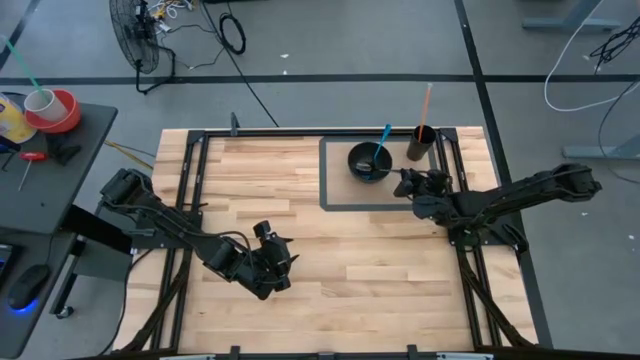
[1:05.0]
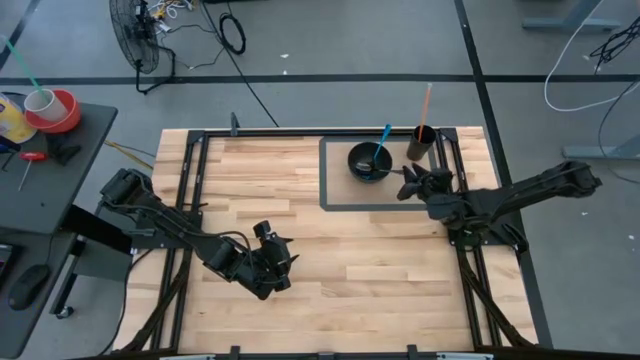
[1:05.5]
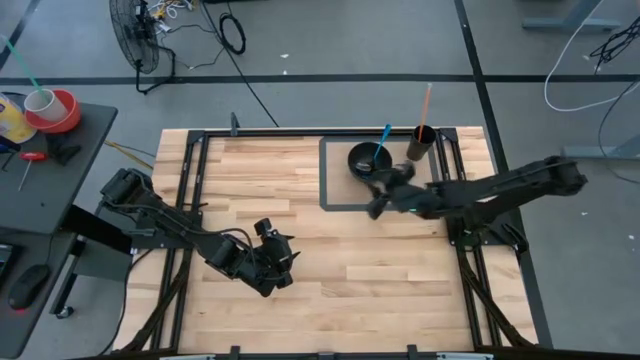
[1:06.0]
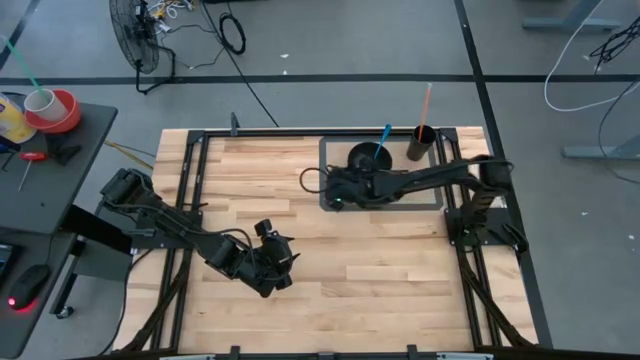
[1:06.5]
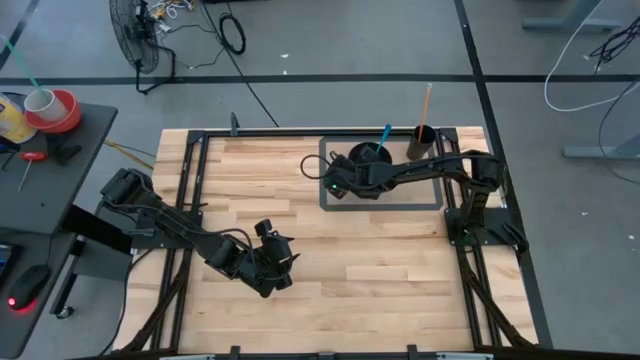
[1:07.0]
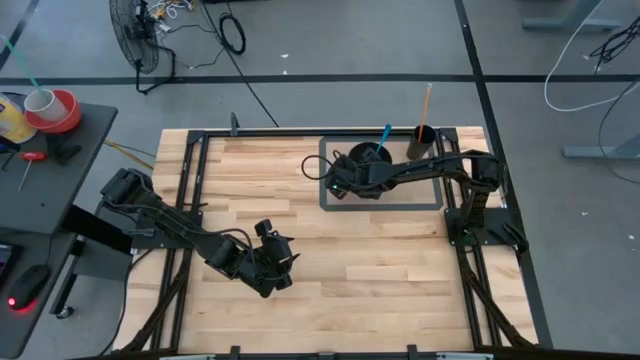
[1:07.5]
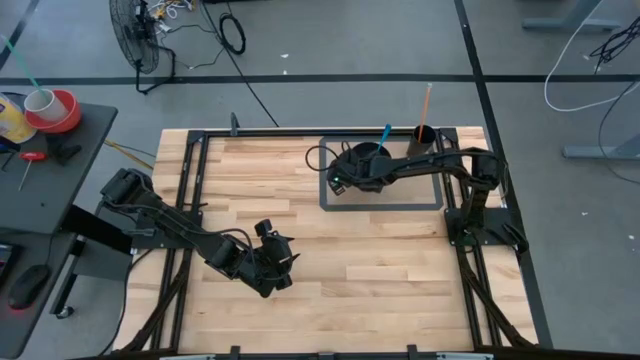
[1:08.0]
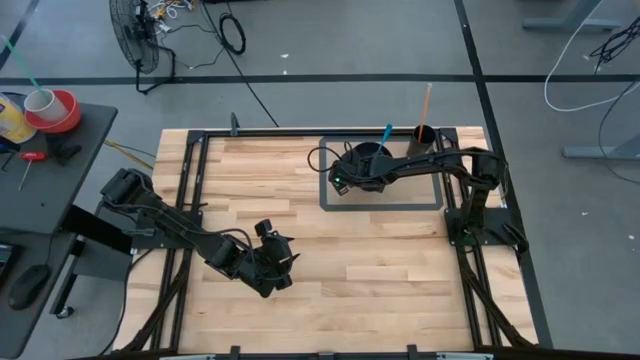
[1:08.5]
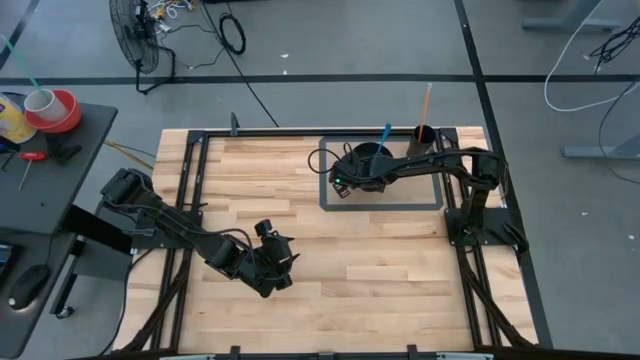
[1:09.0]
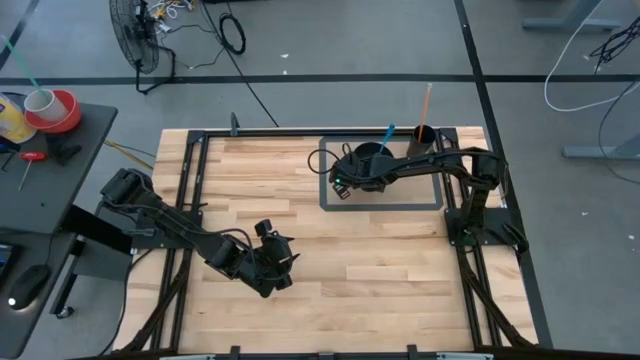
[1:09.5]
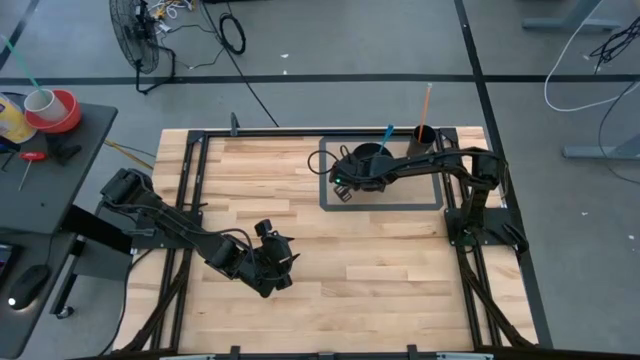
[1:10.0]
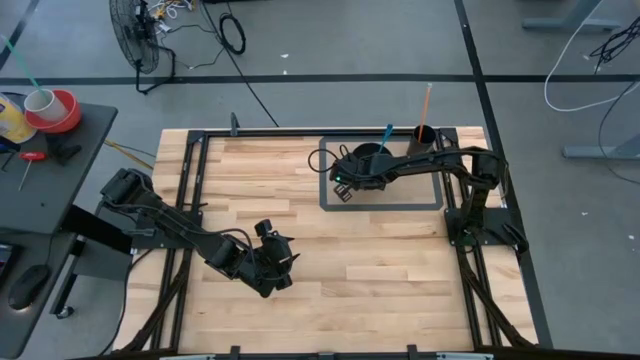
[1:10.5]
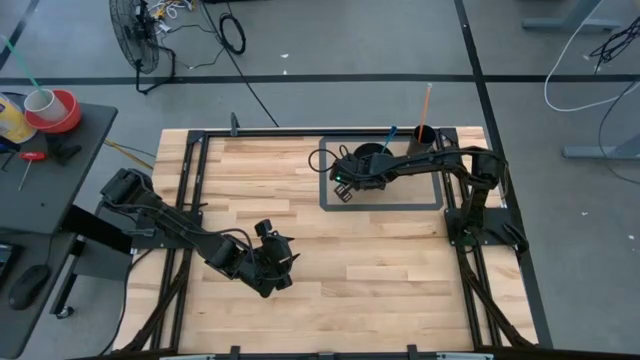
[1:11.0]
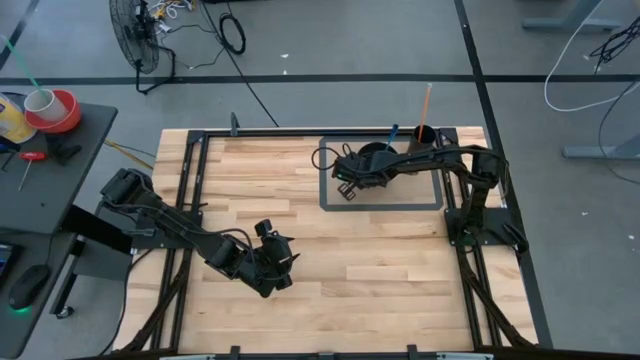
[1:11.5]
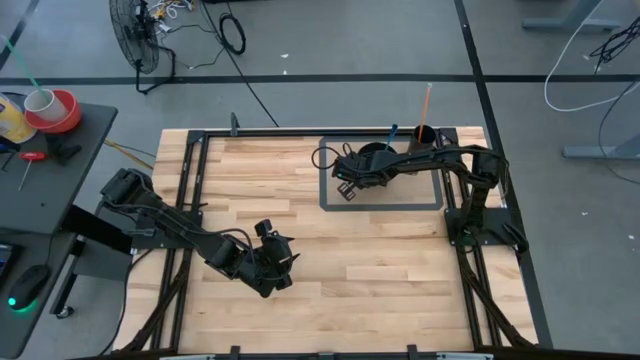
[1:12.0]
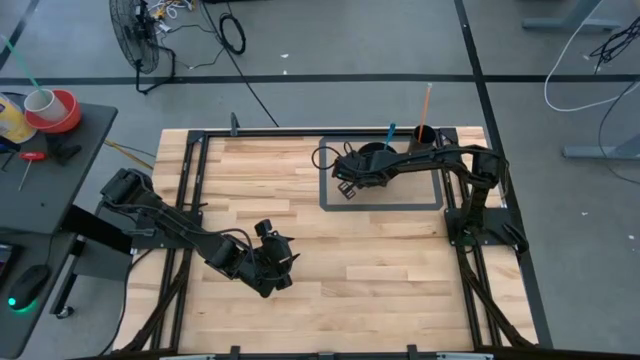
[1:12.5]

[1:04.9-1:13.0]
Task: Pick & Place Utensil
Adjust the black bowl

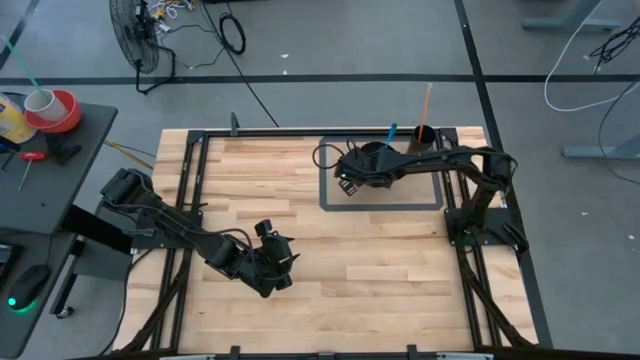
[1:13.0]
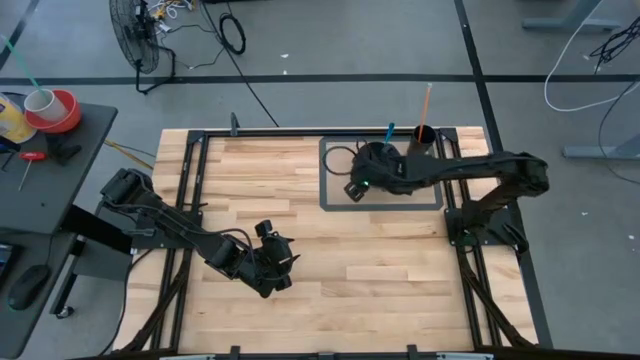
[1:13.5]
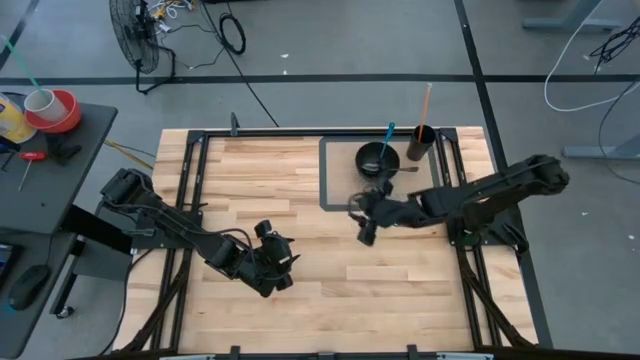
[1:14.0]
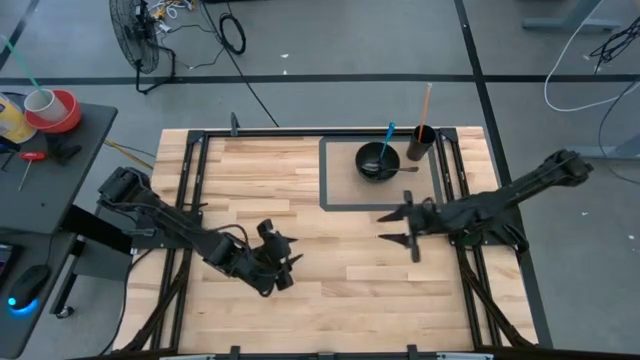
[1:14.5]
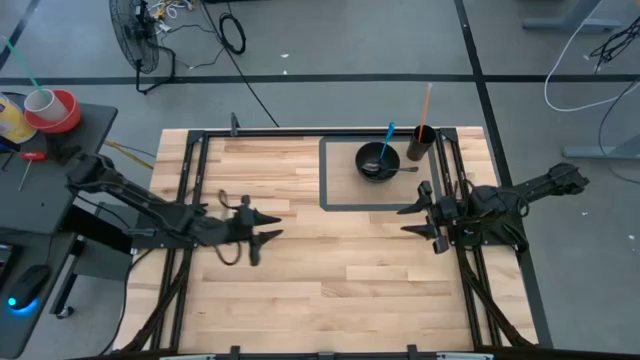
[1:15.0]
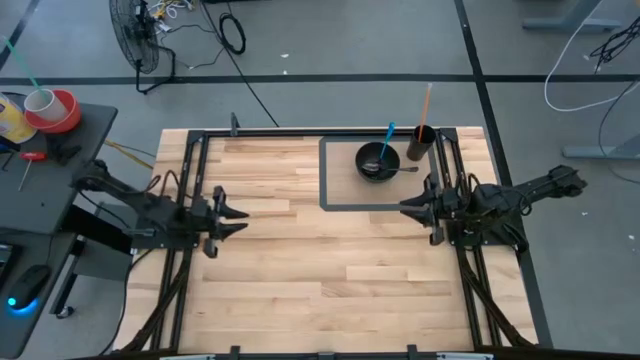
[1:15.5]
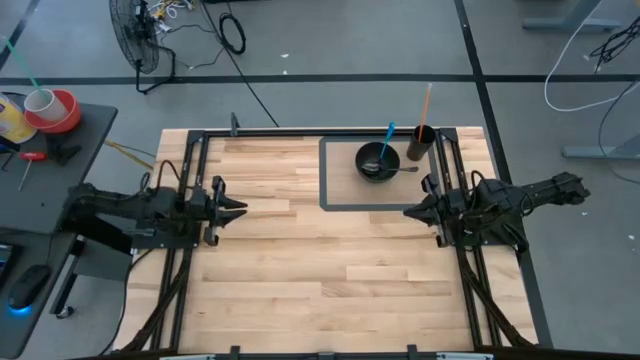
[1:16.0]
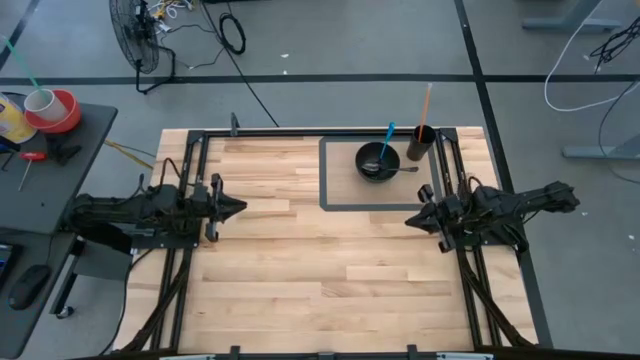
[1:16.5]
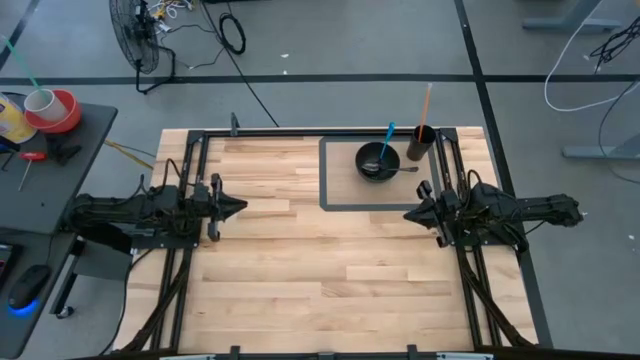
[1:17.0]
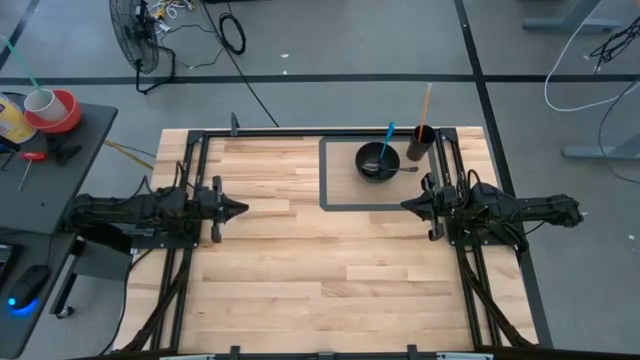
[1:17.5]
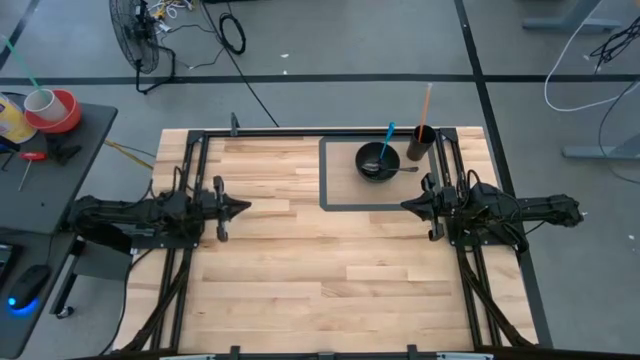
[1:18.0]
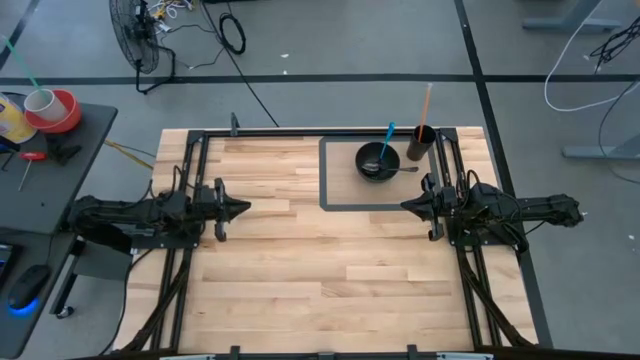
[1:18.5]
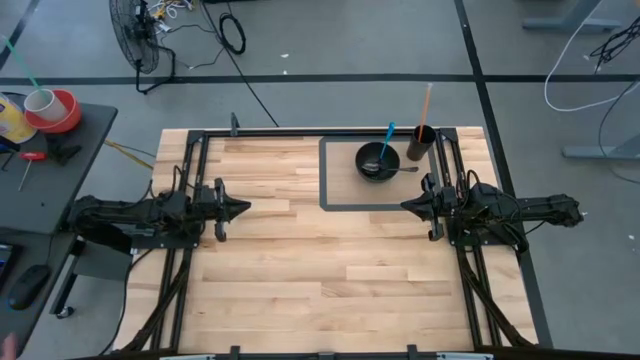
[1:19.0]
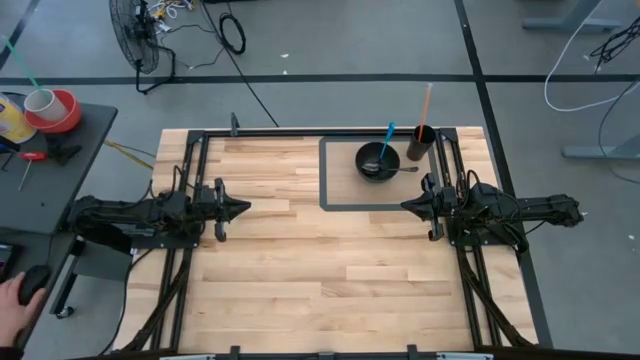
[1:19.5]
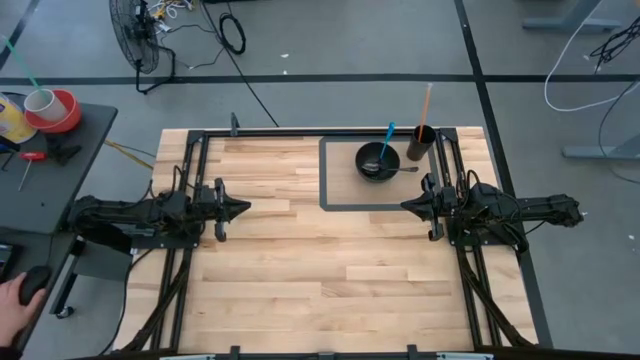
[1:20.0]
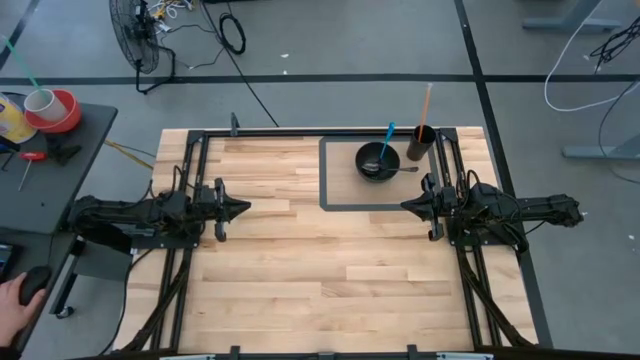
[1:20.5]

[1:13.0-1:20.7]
Return to Home Position

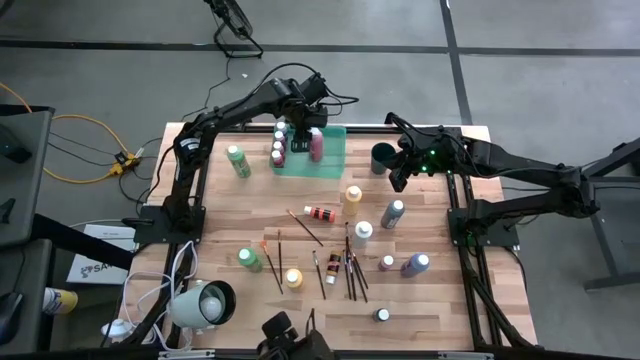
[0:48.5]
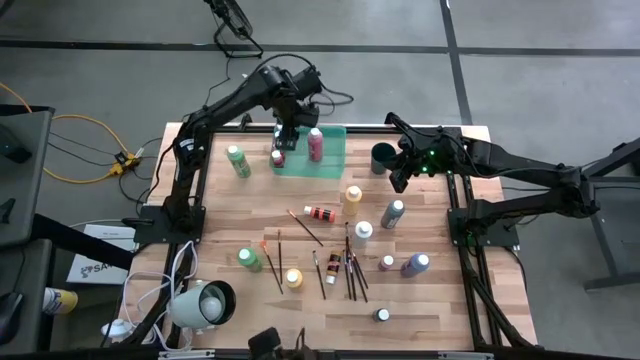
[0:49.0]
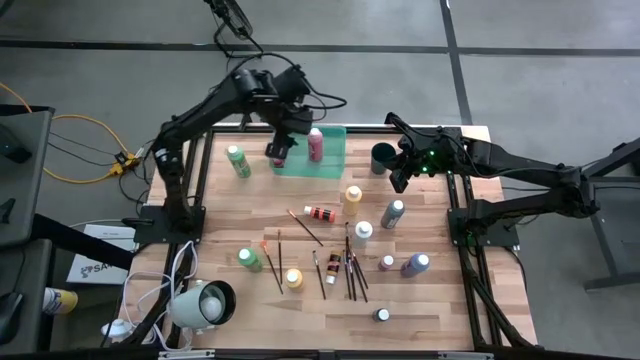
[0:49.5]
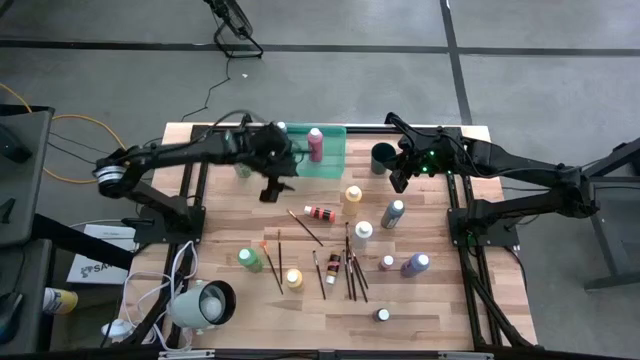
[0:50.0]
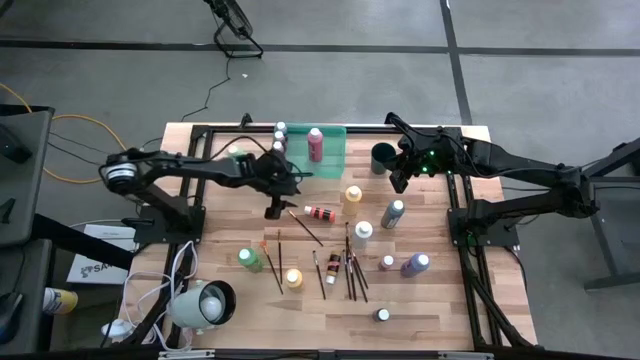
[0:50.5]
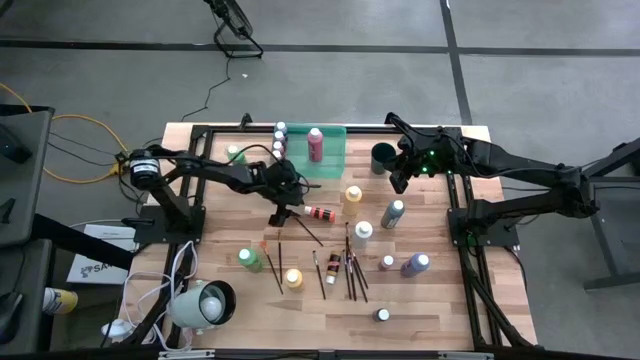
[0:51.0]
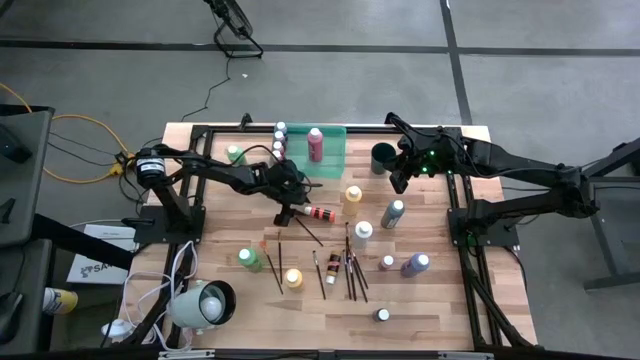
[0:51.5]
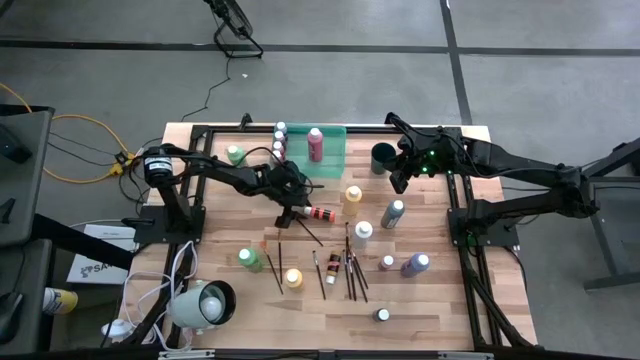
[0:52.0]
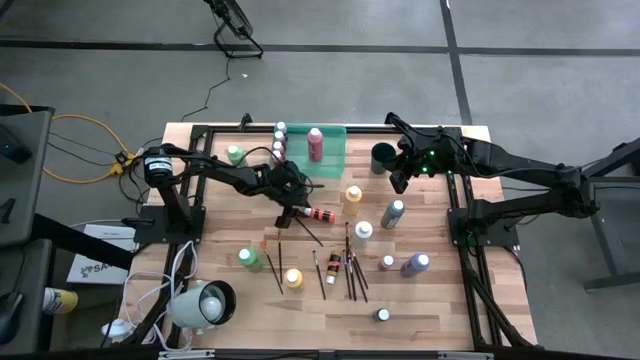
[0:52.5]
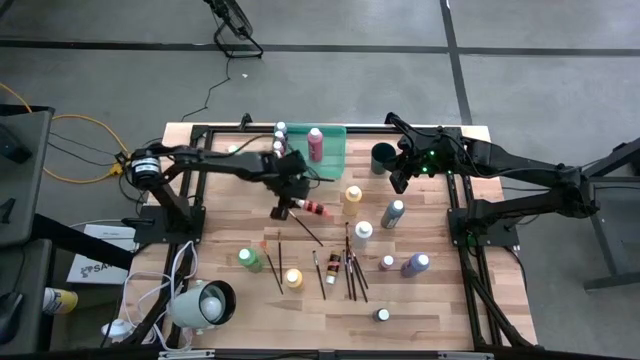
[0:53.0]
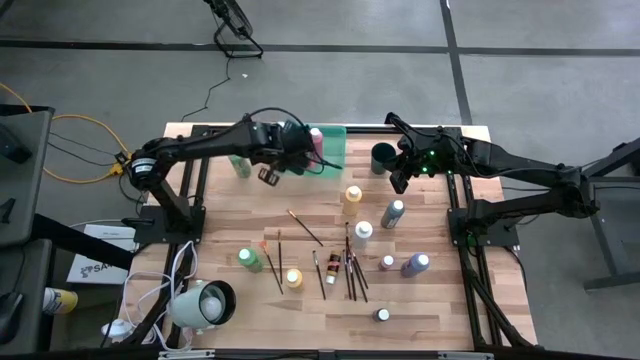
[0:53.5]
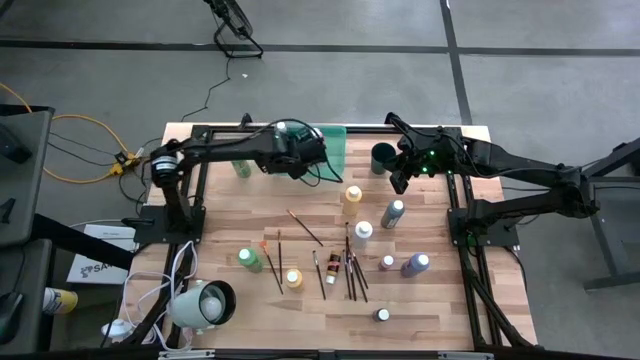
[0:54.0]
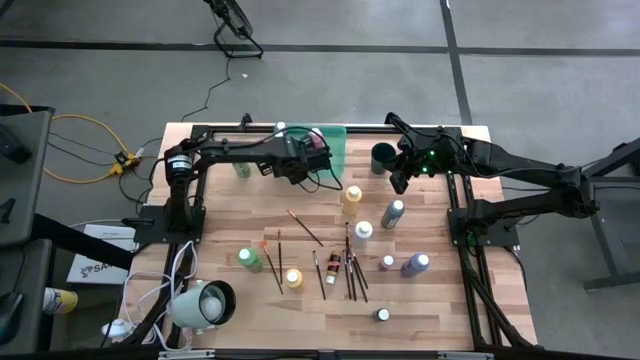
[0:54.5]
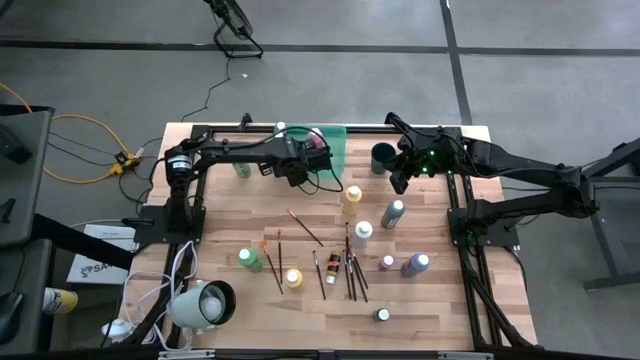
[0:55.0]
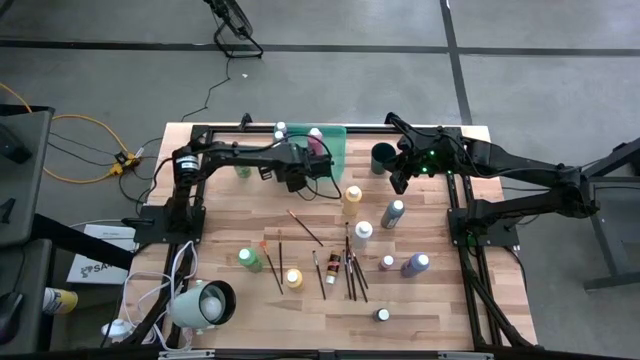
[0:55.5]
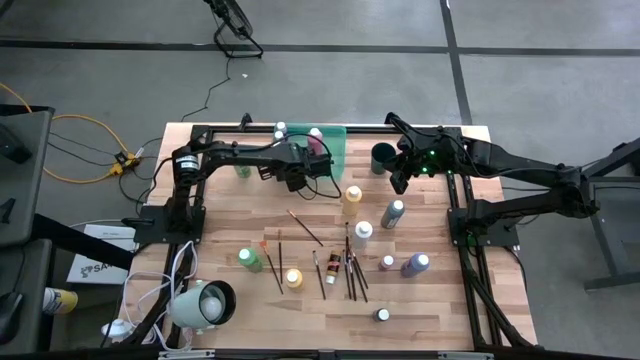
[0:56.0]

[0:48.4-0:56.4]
Task: Pick & Place Paint Supplies
Put the orange paint bottle into the green bin
